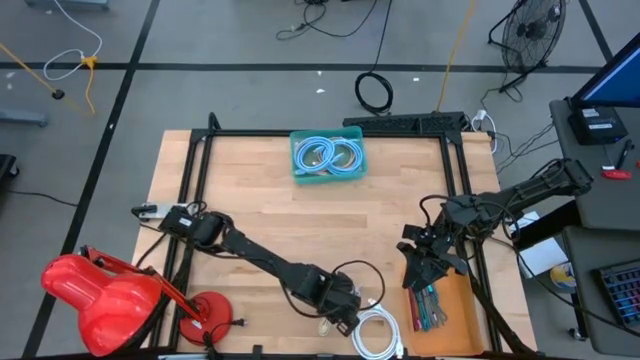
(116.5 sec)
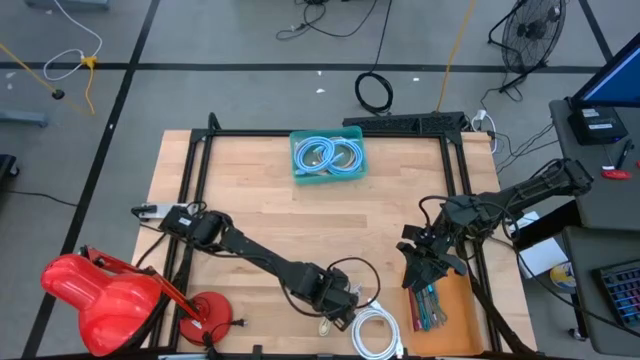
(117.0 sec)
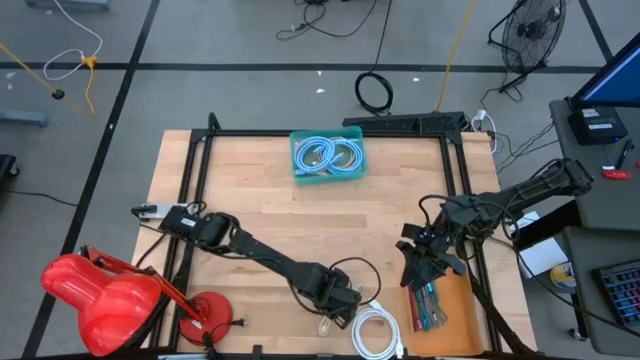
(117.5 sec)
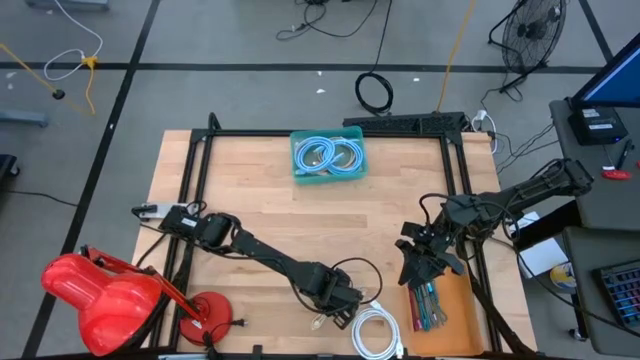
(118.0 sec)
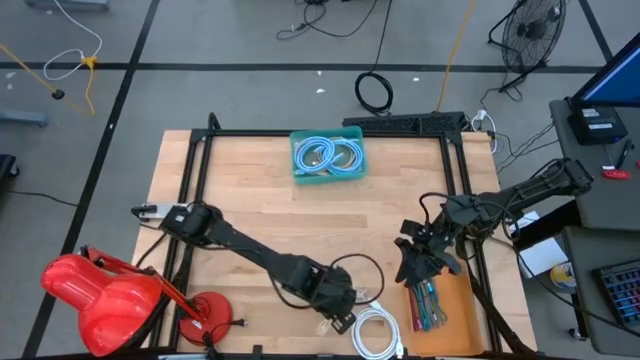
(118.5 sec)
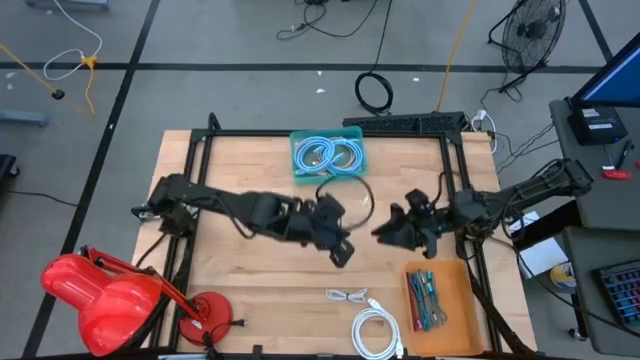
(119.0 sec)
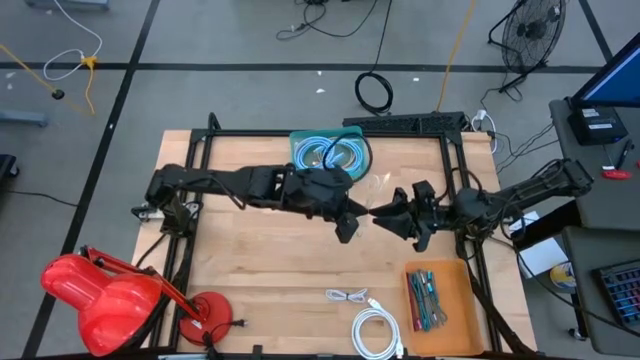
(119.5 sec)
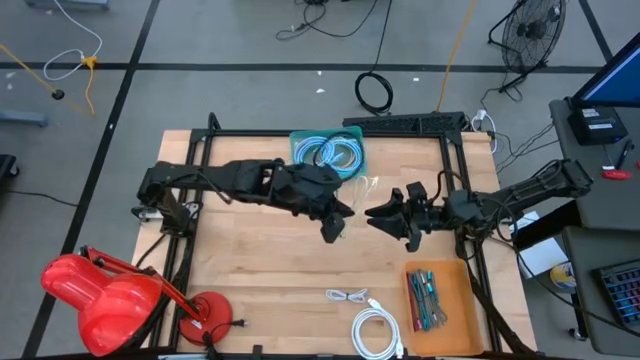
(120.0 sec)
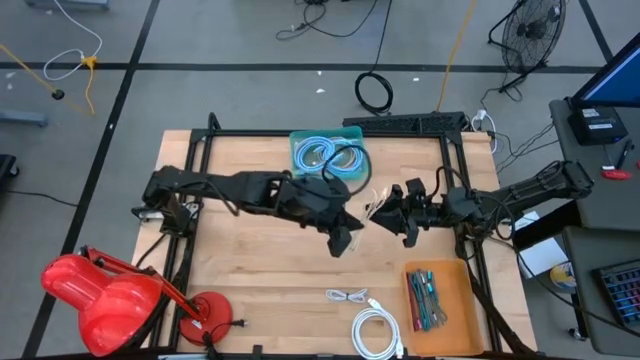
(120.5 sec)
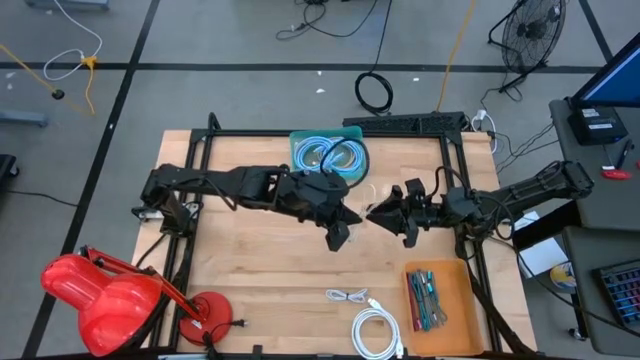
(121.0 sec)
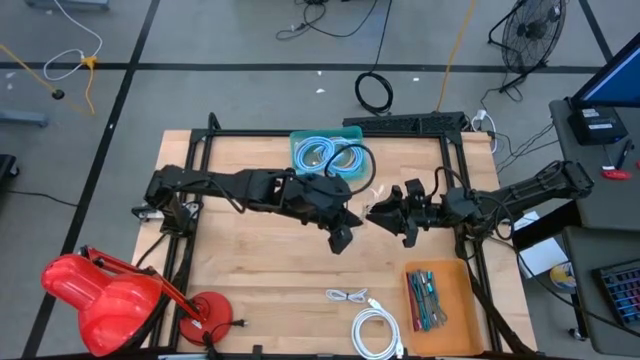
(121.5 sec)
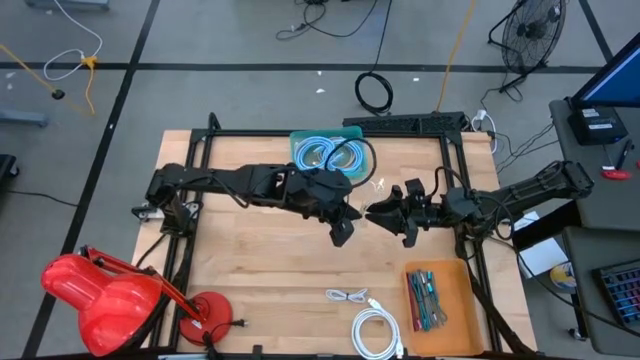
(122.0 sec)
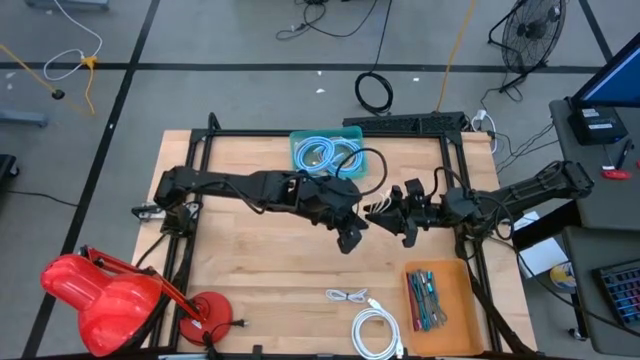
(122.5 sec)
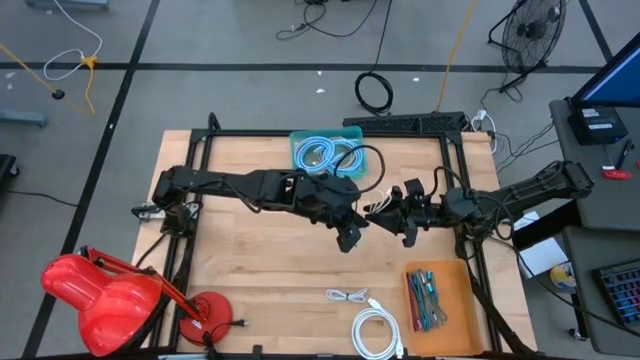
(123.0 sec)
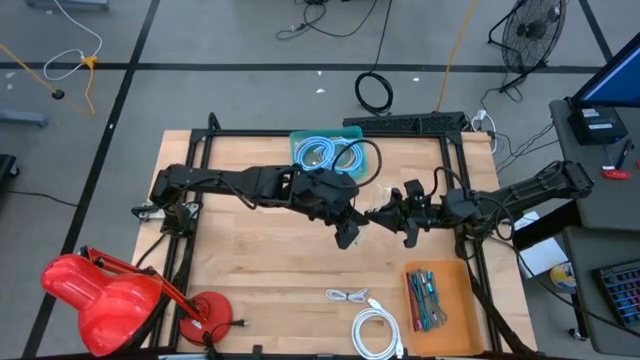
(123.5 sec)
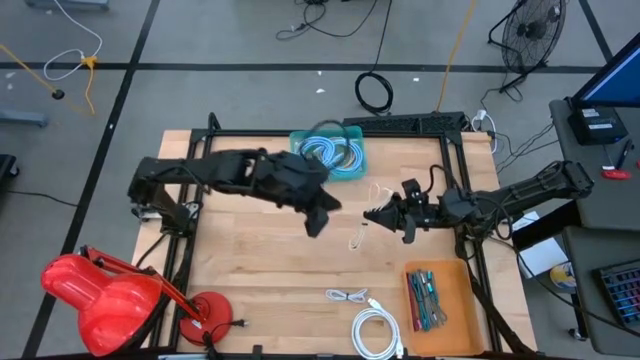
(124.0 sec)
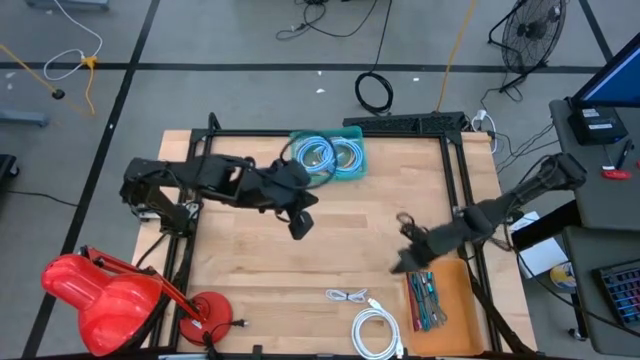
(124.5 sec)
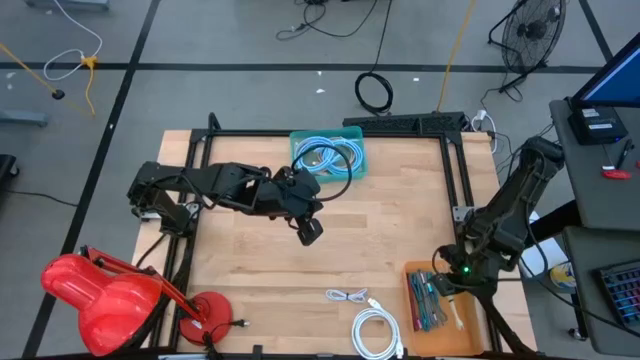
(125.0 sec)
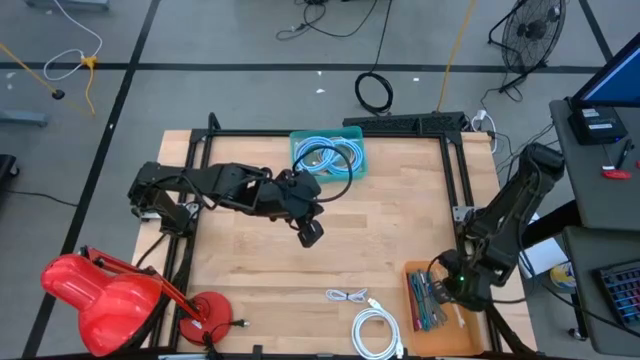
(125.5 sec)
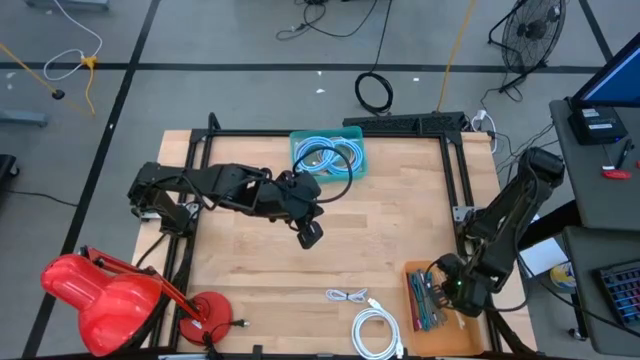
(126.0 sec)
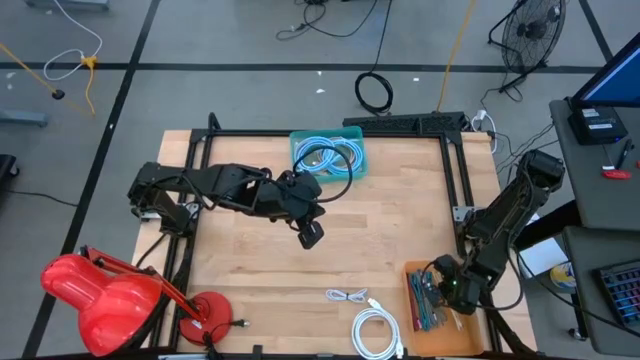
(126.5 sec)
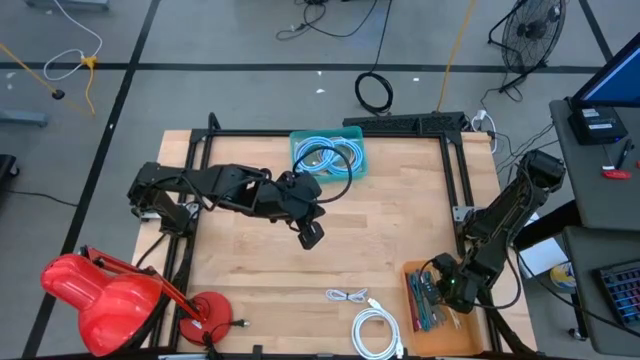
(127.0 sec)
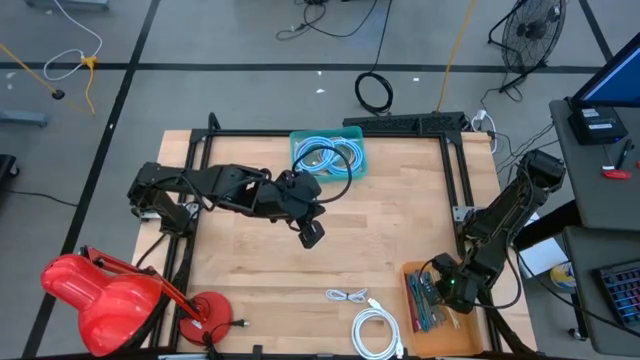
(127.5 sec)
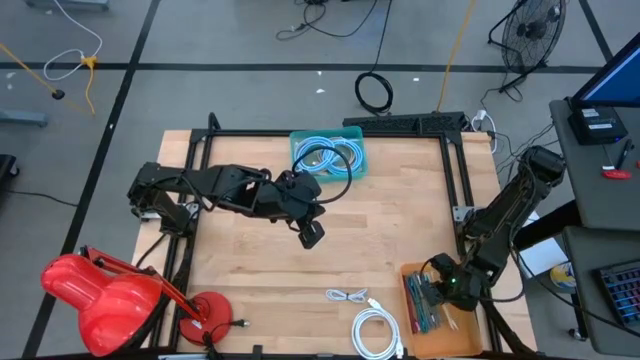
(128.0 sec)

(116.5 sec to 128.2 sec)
Task: Pick & Place USB Port
Put the brown charger cable into the orange bin

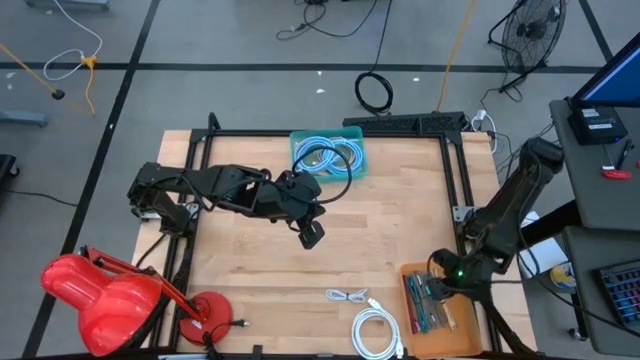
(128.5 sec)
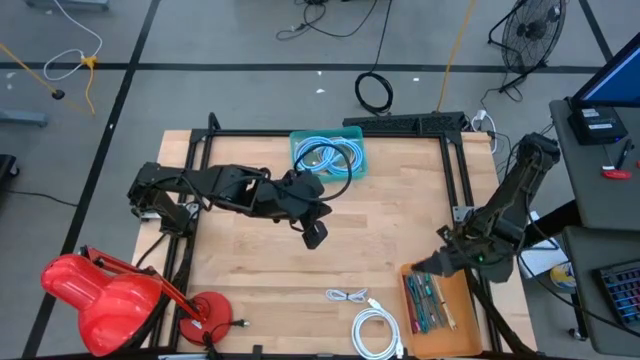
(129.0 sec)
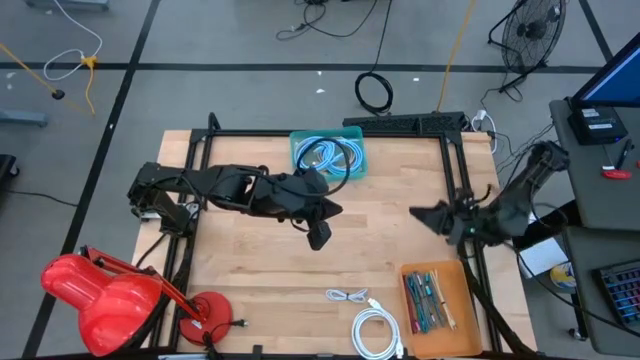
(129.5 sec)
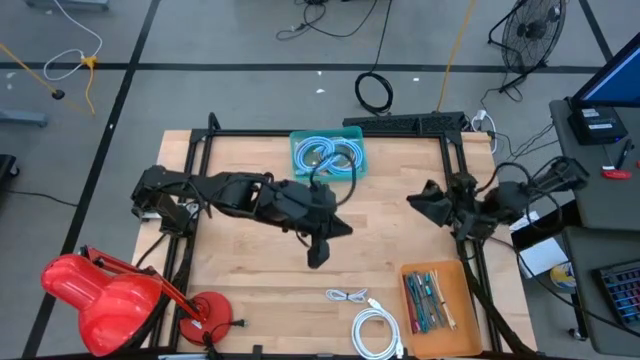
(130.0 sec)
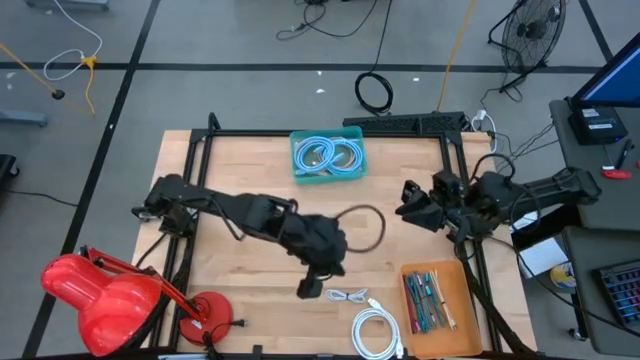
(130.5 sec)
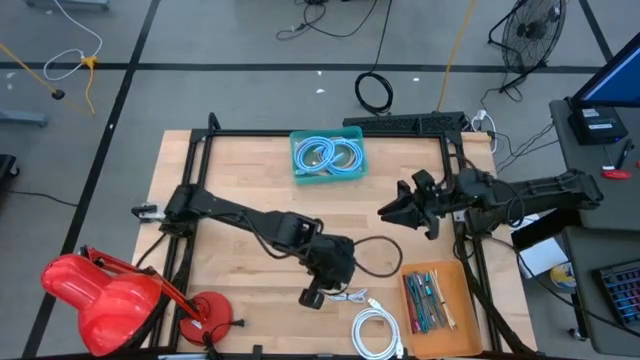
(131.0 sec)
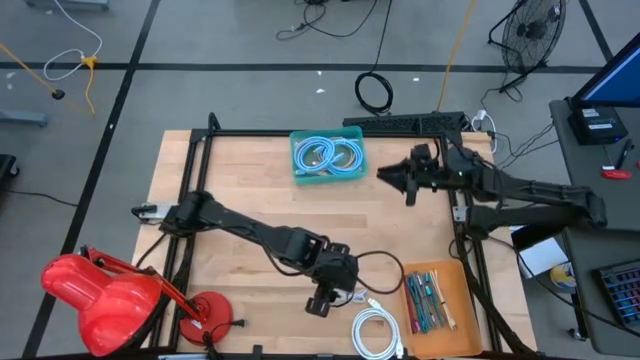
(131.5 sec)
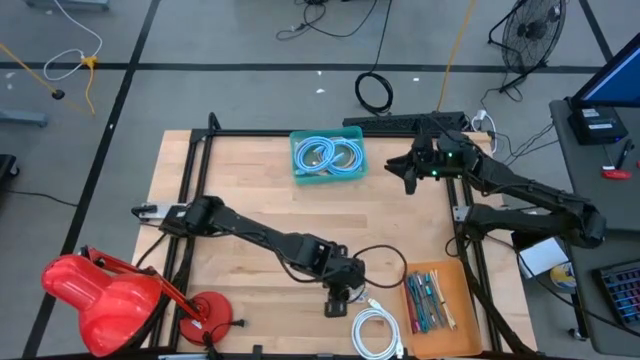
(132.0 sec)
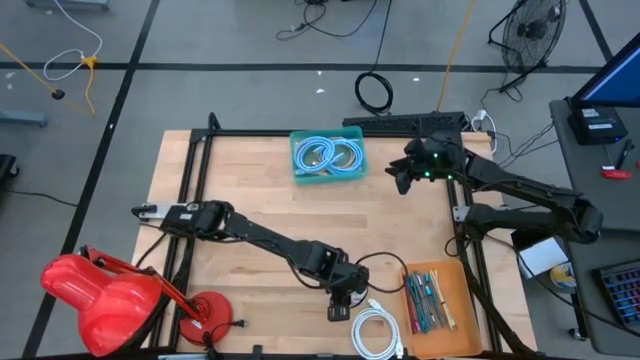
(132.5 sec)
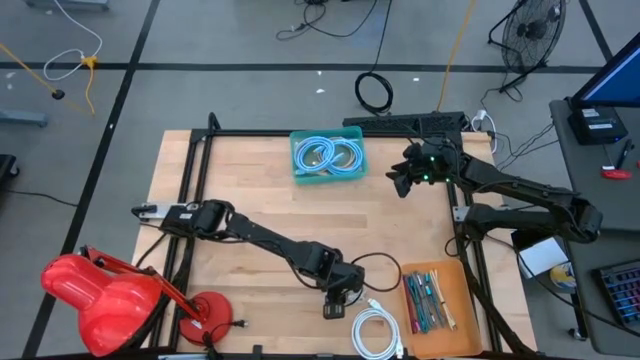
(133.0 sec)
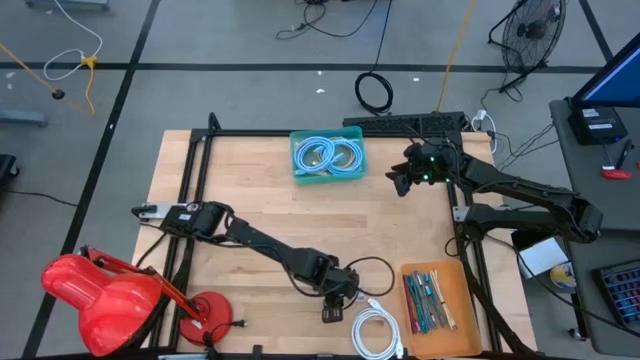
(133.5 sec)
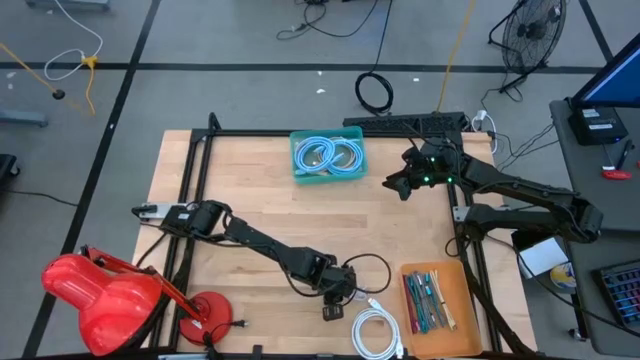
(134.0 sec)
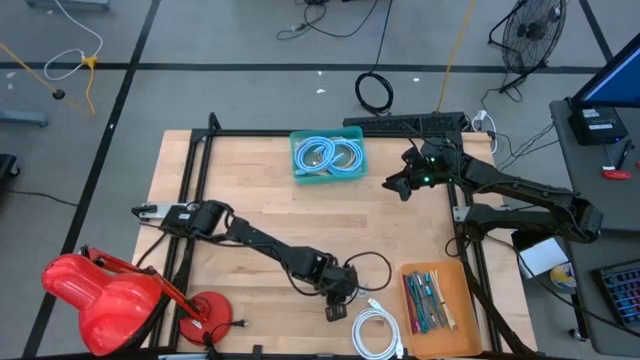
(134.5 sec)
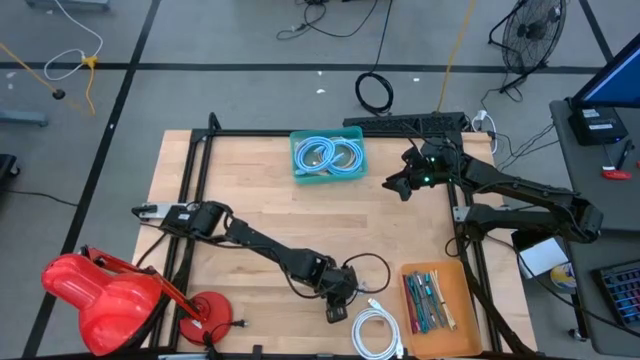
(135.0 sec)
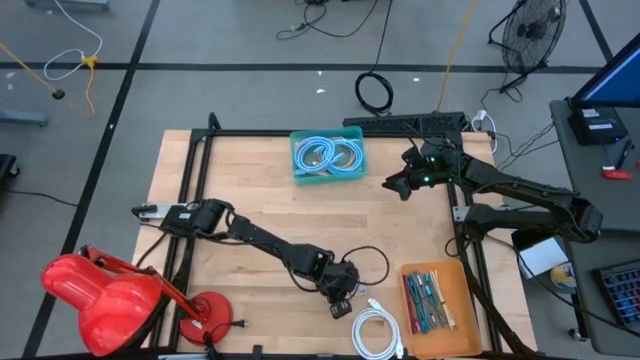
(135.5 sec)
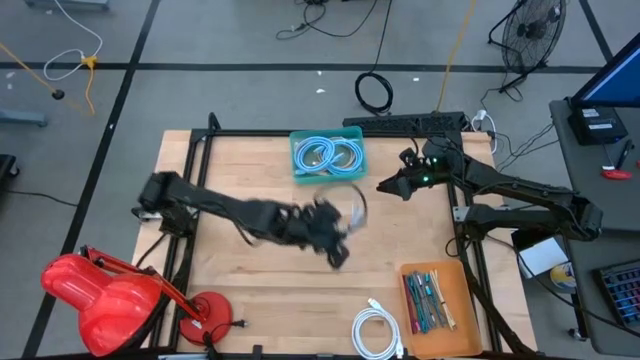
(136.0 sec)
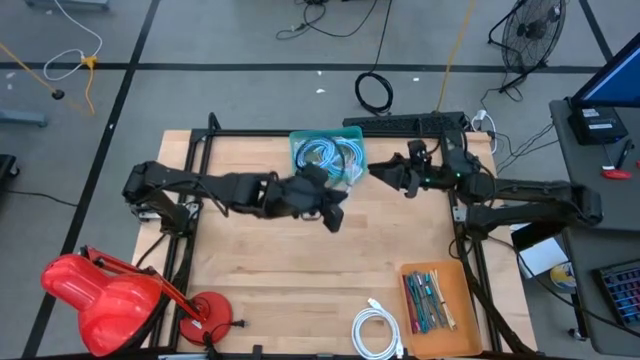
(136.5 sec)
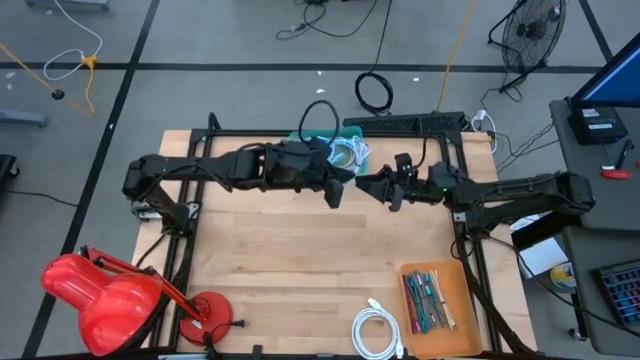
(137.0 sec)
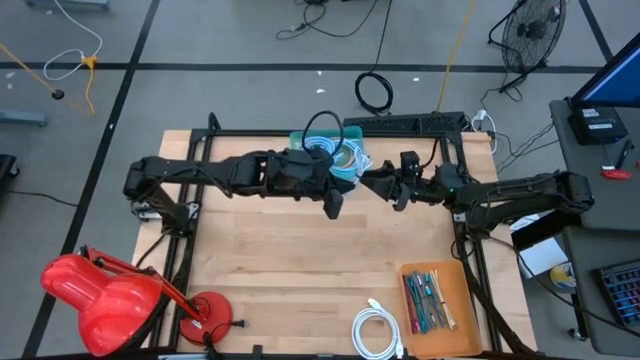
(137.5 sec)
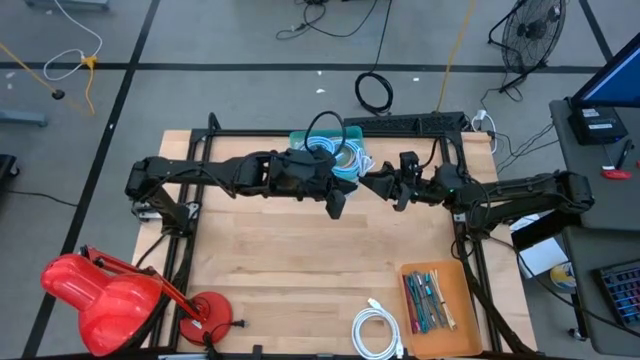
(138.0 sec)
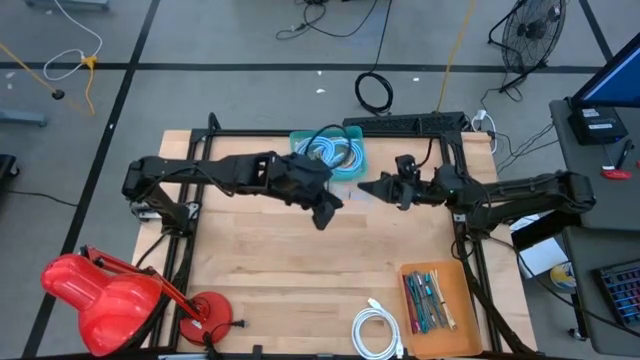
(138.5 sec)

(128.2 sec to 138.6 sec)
Put the white charger cable into the orange bin
